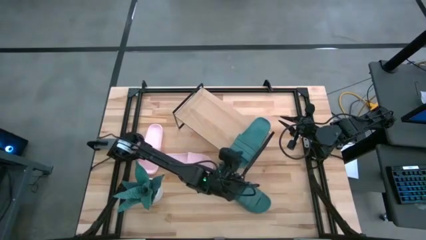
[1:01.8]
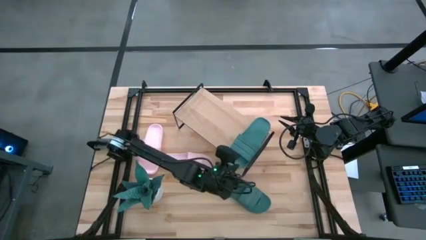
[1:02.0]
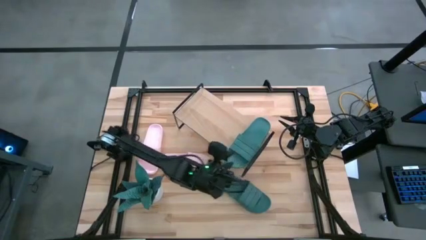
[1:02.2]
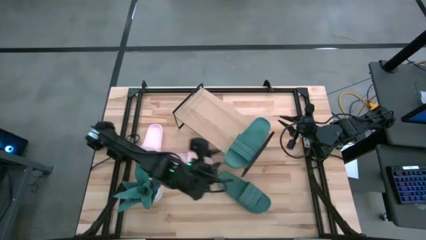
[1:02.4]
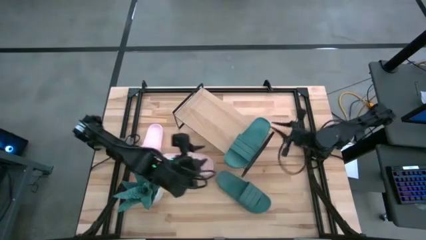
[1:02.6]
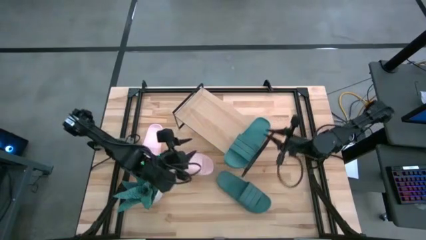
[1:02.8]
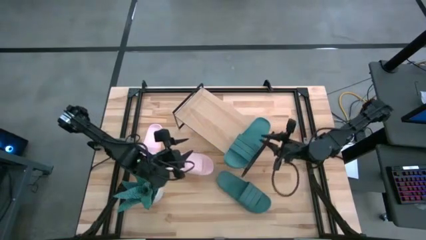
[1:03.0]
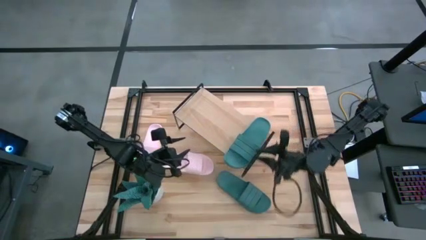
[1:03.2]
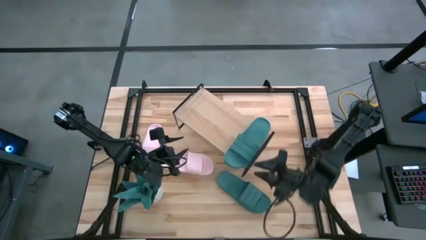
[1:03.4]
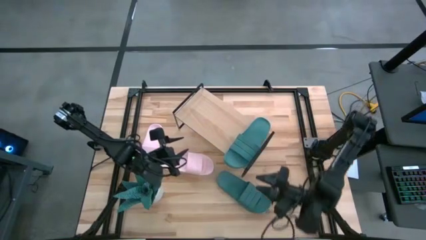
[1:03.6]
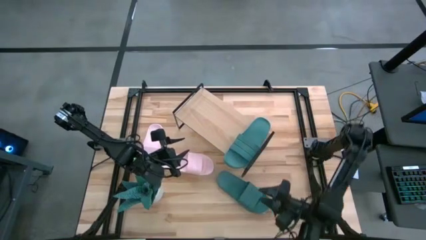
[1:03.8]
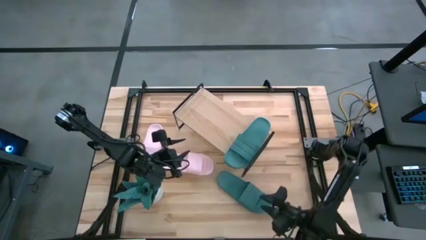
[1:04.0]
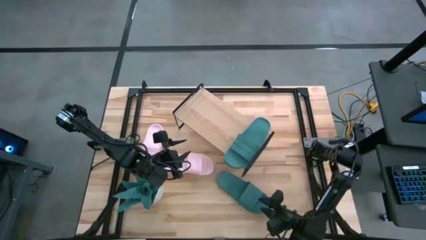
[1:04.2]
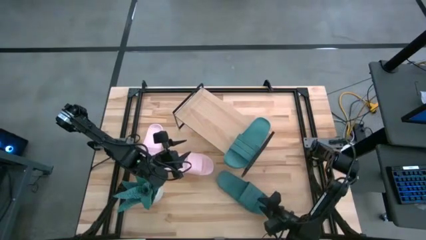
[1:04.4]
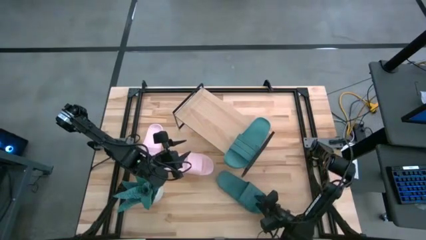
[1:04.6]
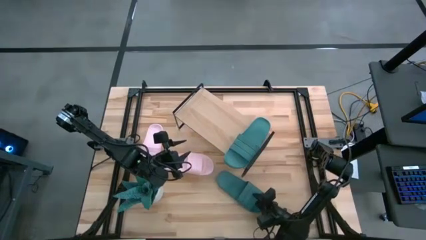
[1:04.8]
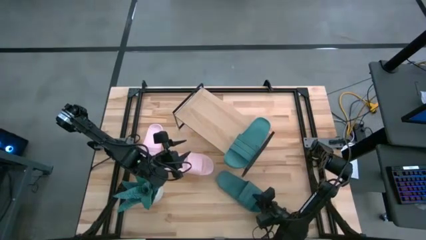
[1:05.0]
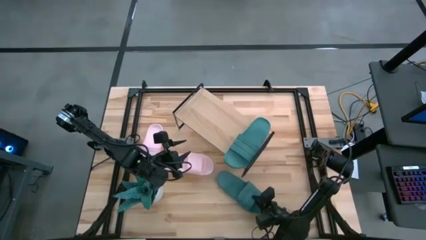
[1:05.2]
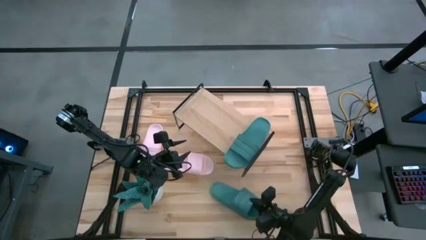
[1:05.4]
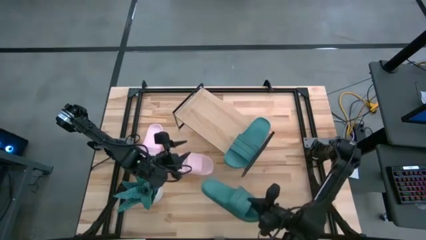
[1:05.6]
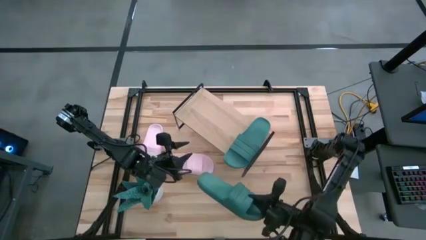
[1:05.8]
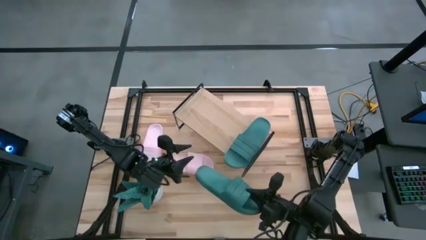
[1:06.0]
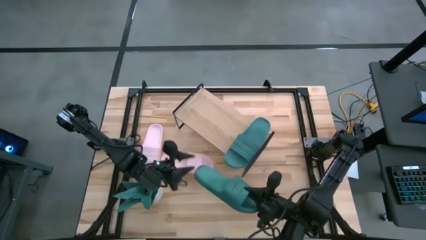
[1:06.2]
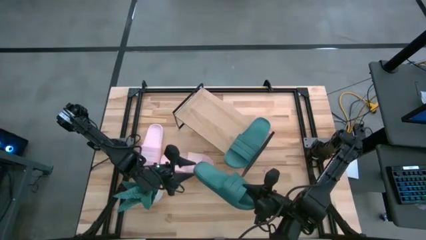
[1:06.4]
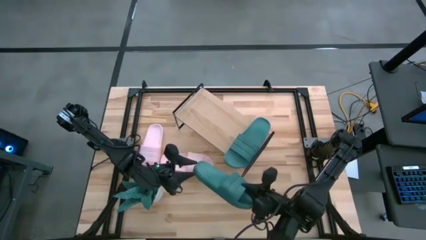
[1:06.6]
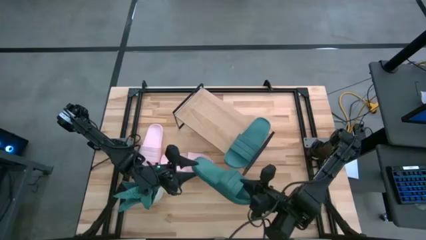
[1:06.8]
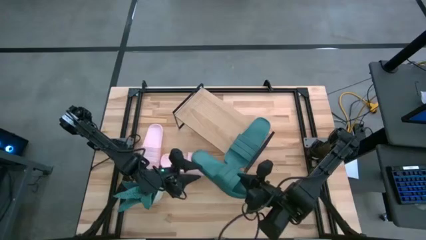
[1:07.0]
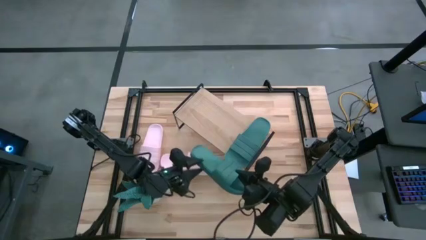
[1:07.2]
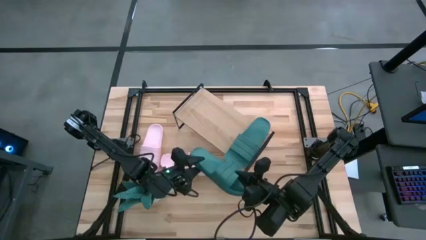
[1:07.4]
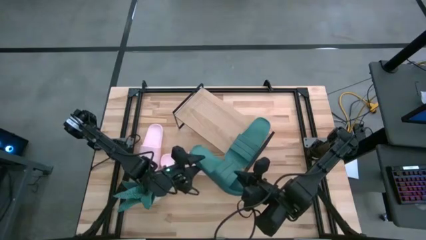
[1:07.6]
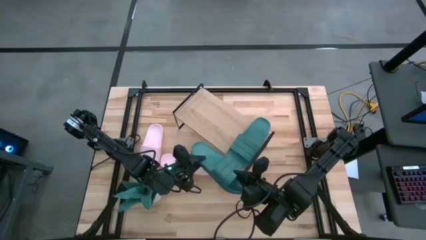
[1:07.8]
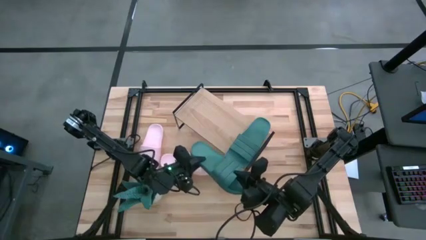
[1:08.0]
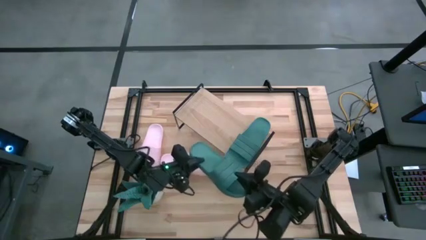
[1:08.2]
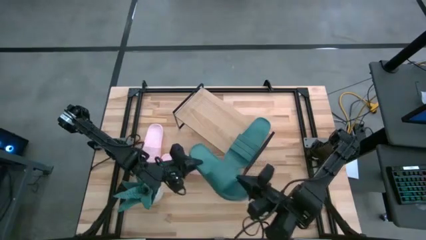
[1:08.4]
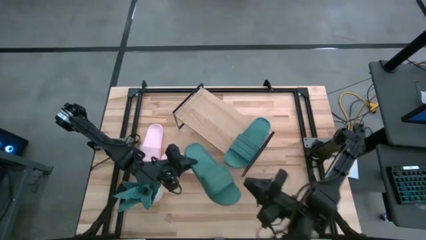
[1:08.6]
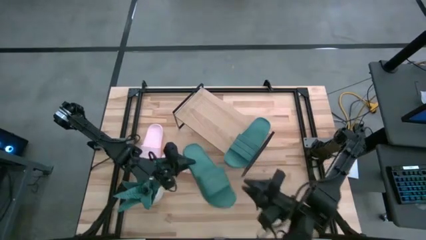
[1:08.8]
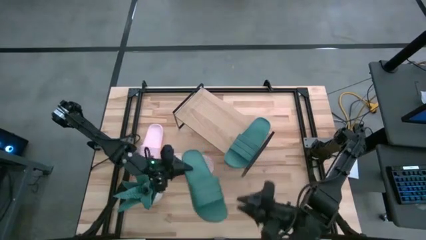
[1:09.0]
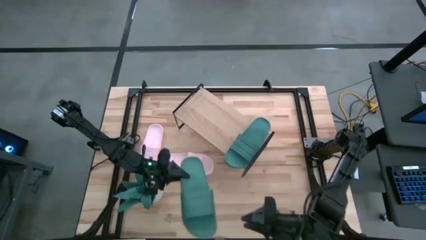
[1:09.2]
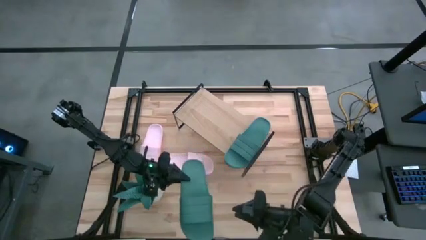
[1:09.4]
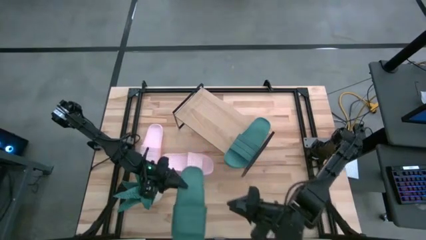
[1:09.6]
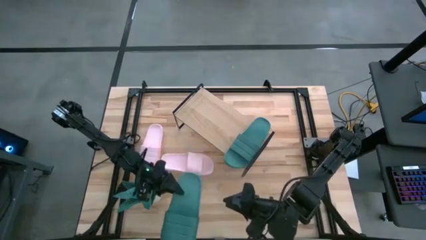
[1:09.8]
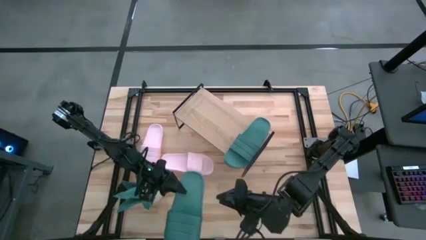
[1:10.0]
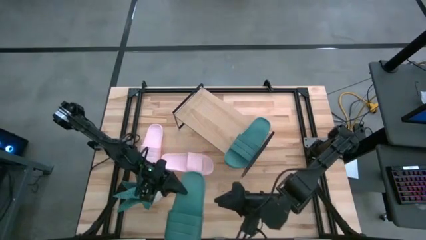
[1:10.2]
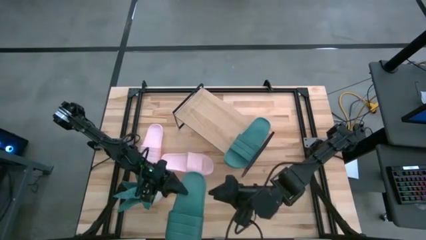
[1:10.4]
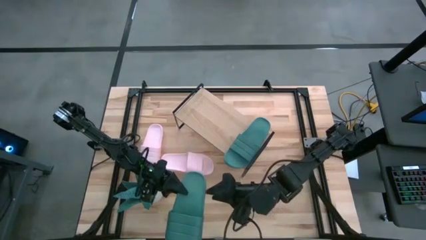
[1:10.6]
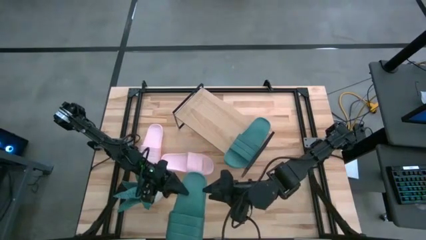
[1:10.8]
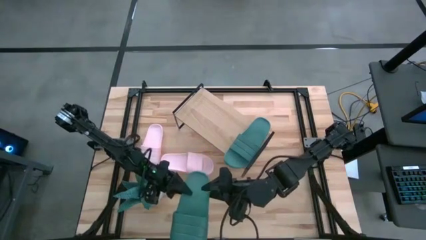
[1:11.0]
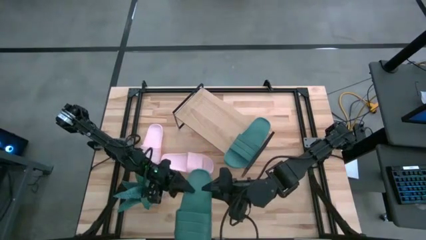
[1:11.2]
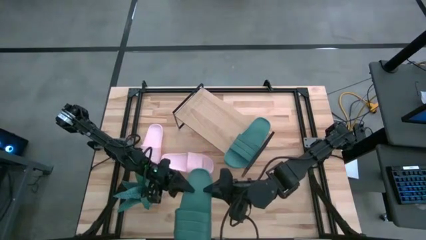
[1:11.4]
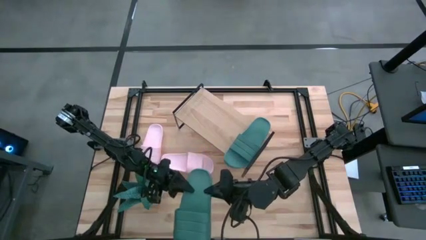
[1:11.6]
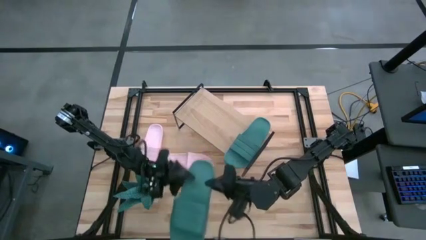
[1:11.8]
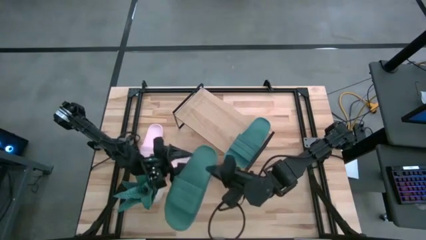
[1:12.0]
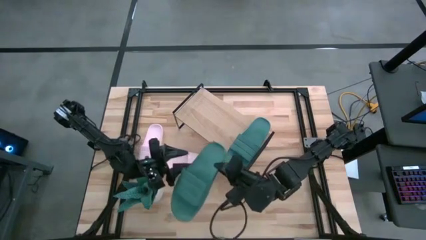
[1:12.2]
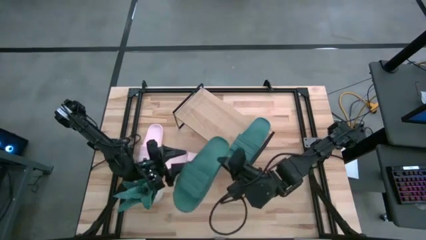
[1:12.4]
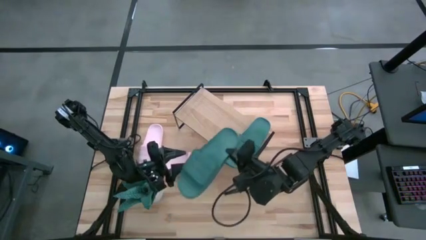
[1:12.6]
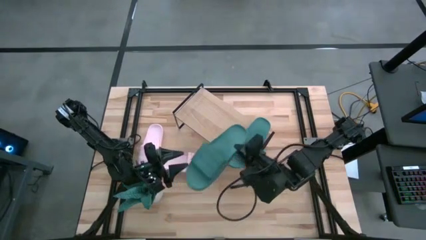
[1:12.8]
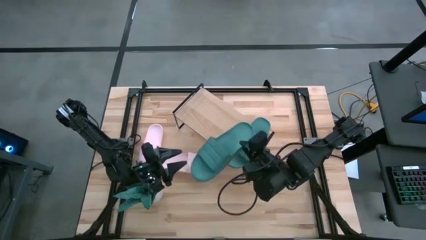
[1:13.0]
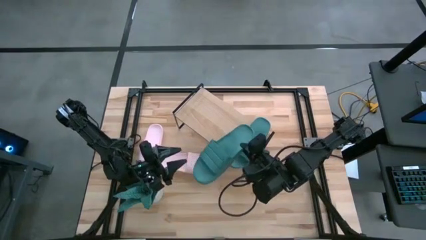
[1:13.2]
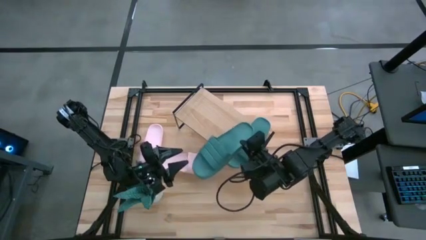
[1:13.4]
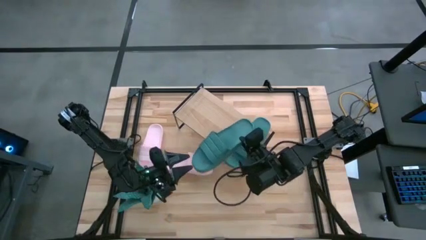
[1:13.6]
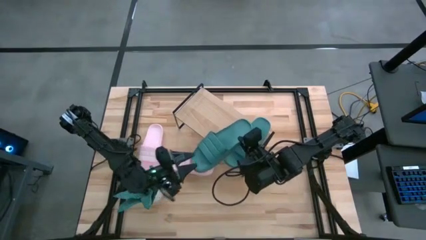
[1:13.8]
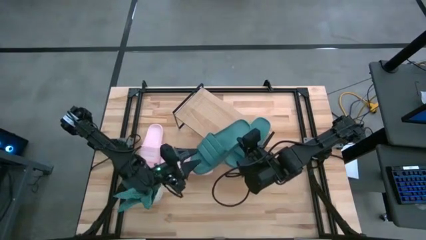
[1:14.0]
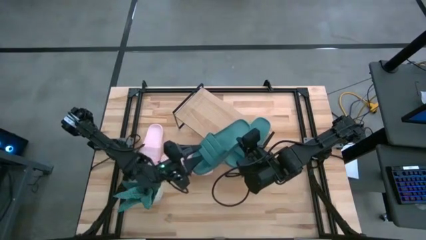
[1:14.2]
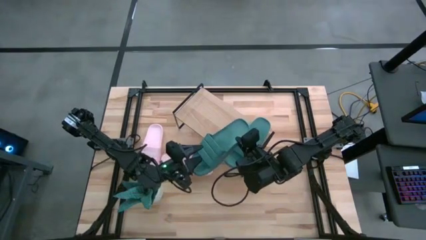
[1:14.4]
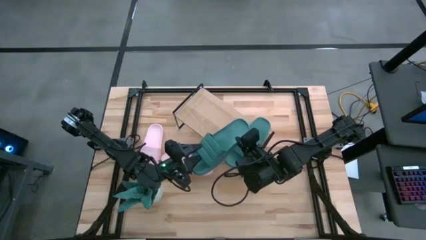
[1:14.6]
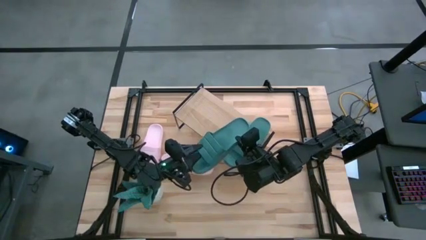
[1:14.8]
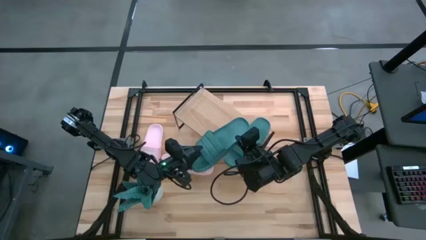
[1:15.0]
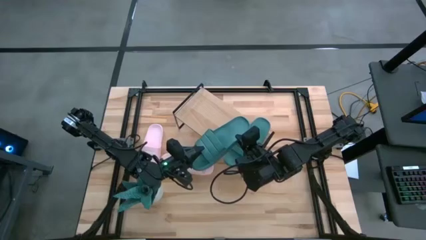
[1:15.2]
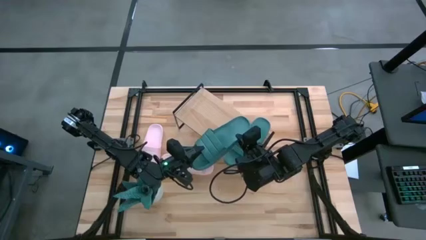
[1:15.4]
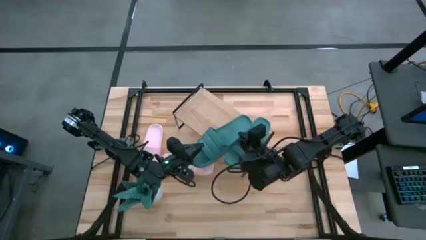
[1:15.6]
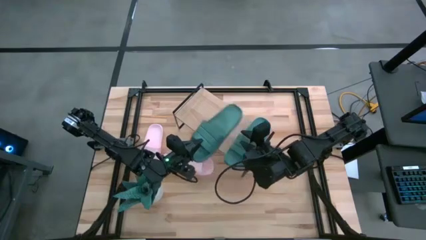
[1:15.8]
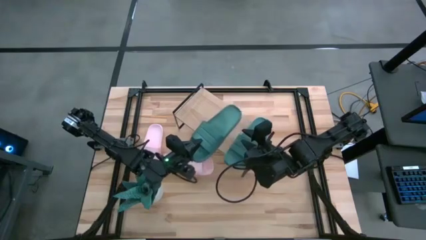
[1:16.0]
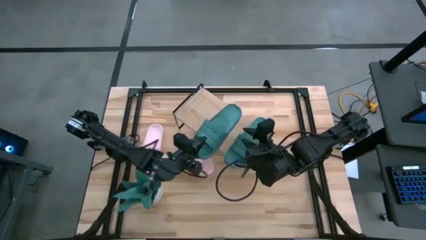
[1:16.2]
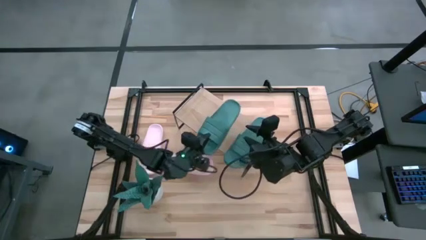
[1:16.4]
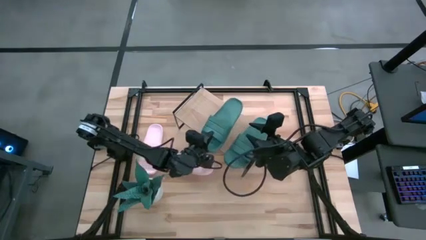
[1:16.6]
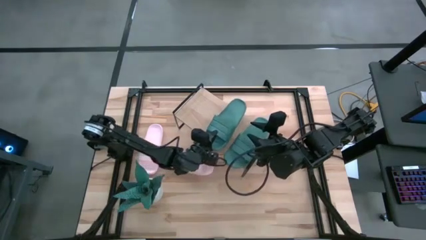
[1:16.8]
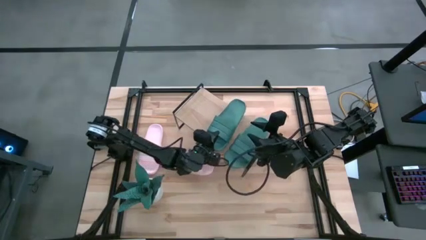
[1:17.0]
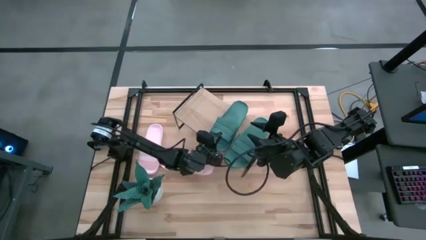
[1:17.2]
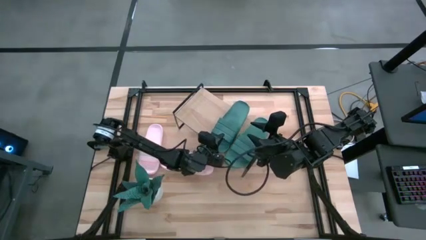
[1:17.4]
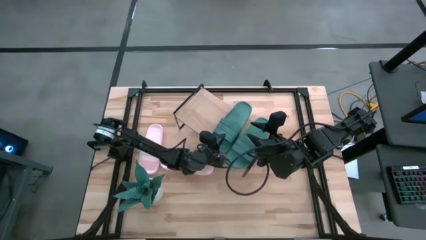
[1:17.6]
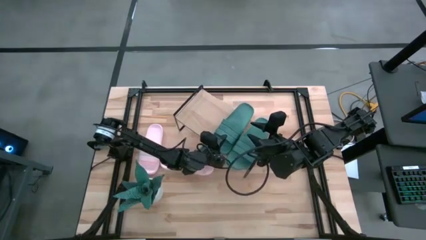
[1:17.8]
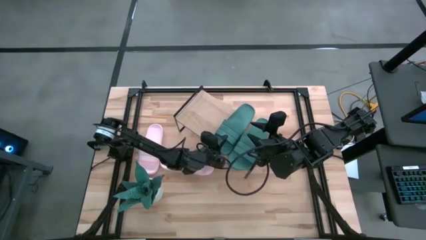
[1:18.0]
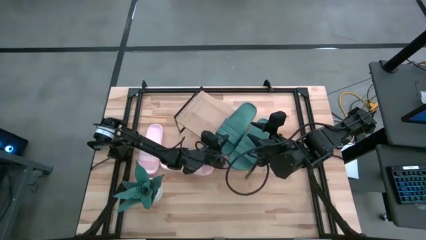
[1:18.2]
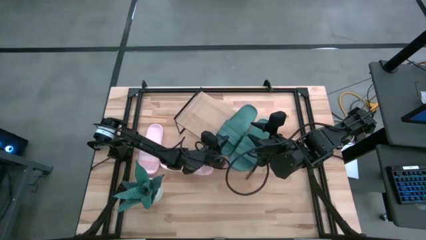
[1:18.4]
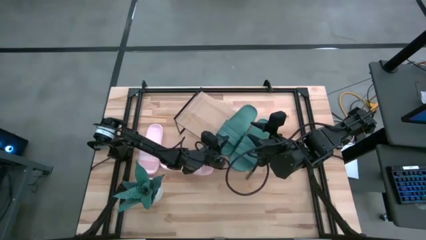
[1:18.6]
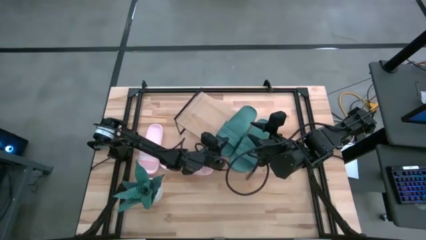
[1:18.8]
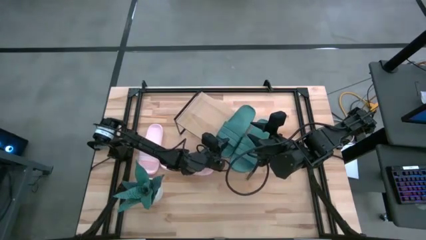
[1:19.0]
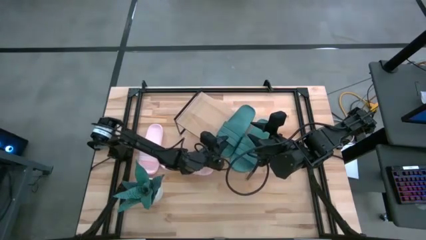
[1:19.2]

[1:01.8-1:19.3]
Task: Pick and place slides into the shelf
Put the green slide on the shelf
